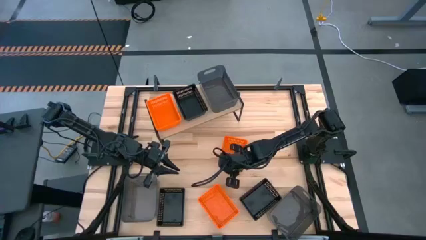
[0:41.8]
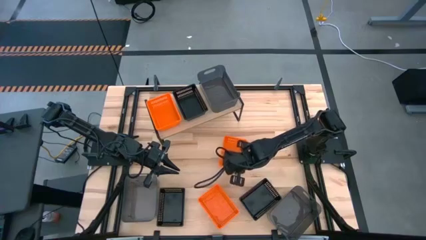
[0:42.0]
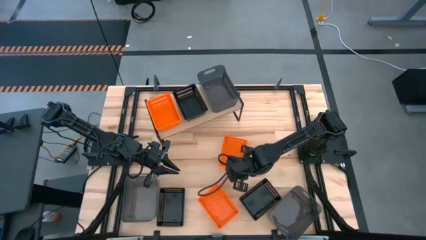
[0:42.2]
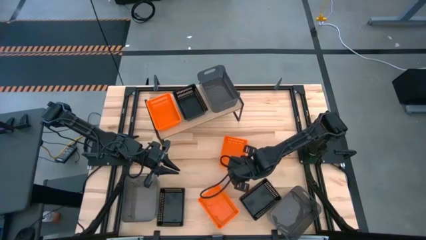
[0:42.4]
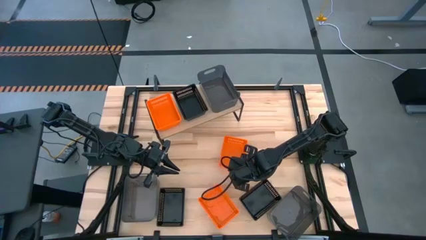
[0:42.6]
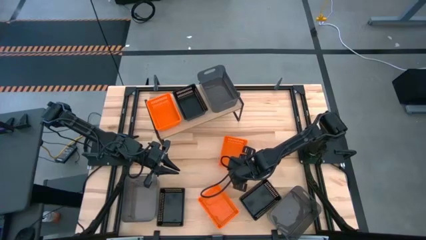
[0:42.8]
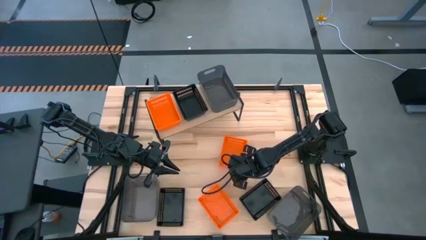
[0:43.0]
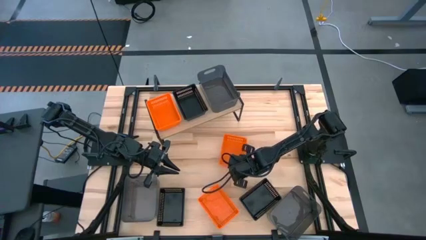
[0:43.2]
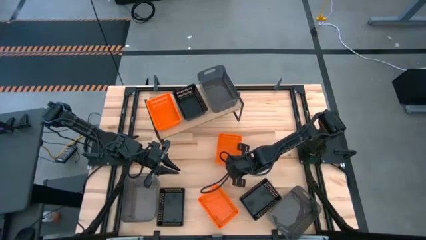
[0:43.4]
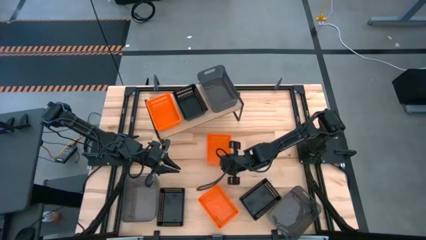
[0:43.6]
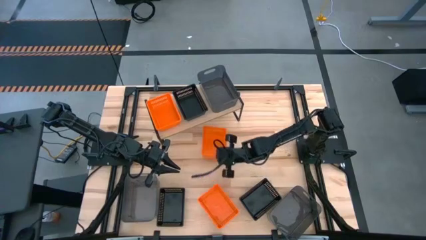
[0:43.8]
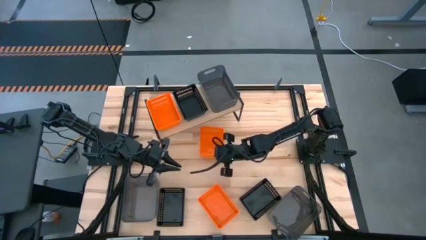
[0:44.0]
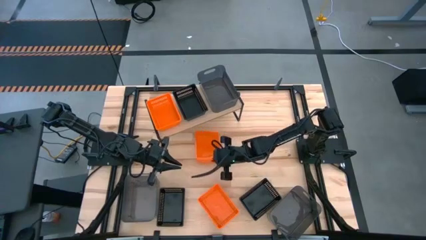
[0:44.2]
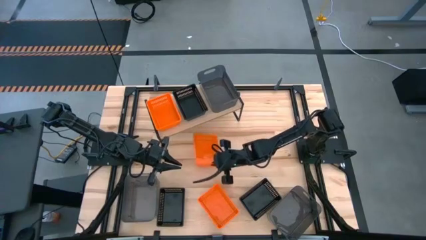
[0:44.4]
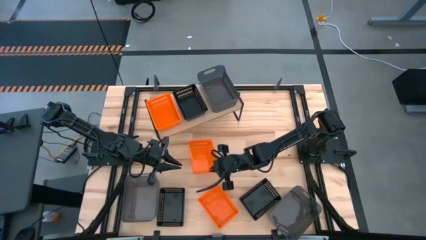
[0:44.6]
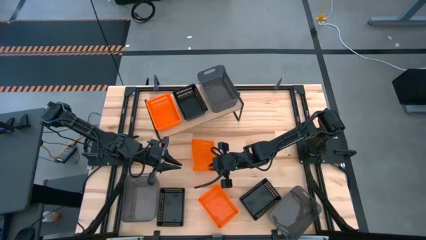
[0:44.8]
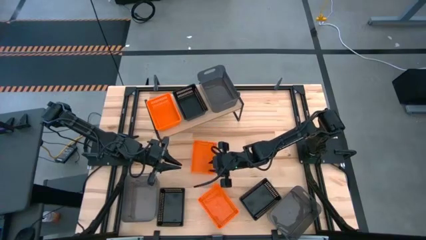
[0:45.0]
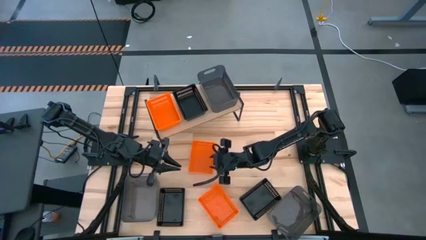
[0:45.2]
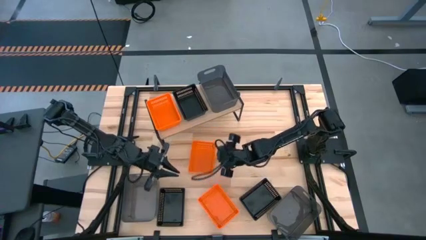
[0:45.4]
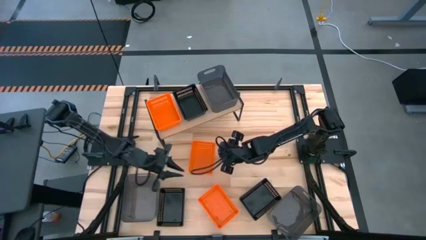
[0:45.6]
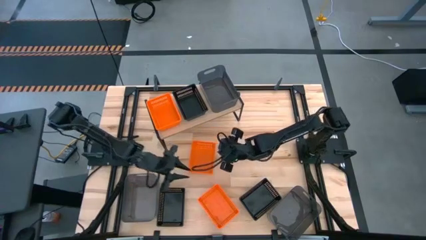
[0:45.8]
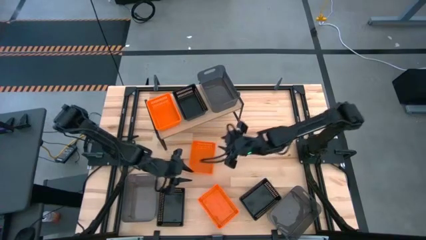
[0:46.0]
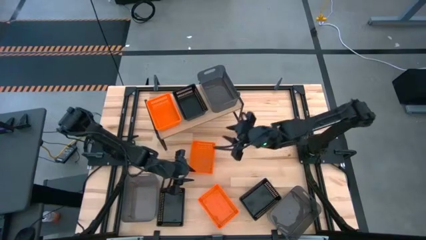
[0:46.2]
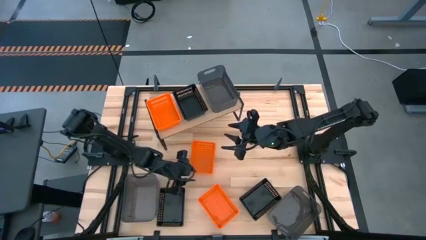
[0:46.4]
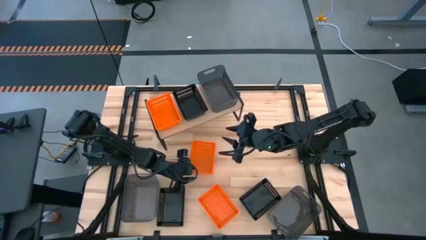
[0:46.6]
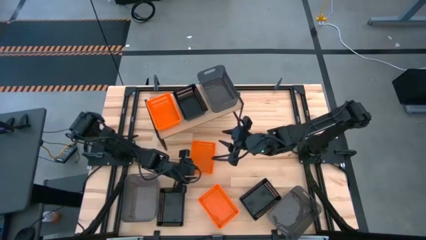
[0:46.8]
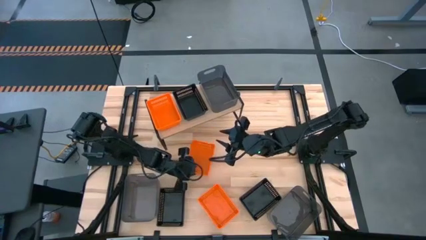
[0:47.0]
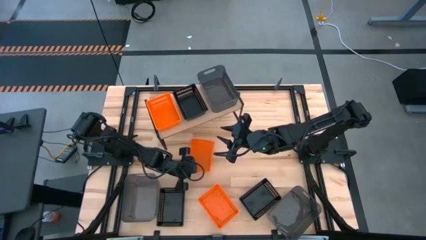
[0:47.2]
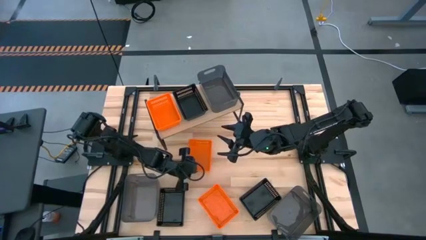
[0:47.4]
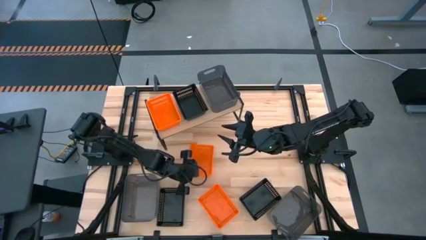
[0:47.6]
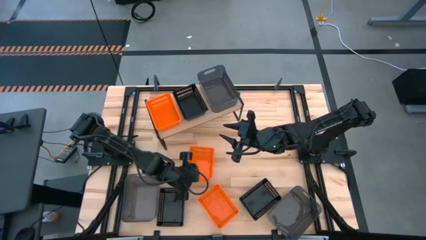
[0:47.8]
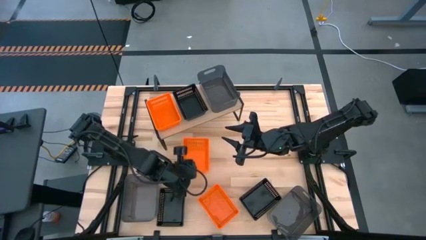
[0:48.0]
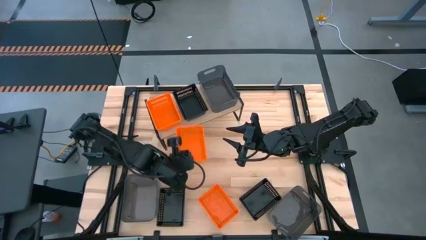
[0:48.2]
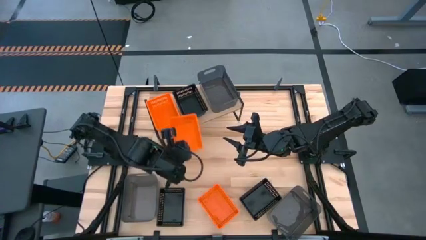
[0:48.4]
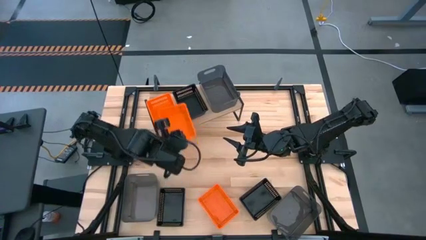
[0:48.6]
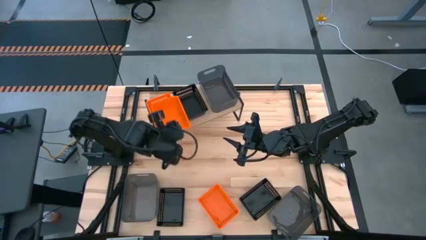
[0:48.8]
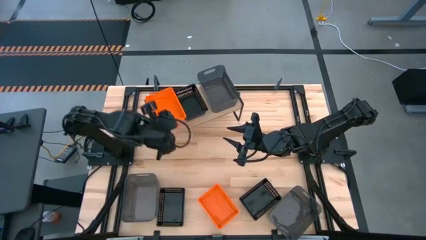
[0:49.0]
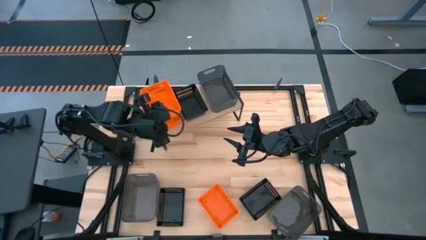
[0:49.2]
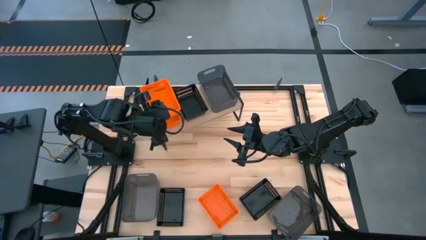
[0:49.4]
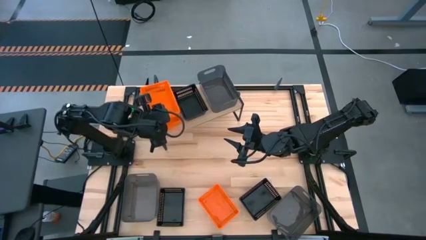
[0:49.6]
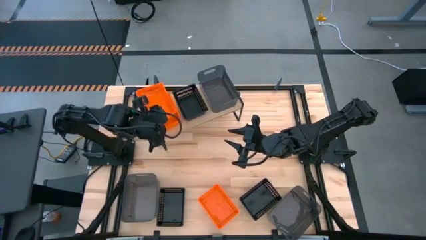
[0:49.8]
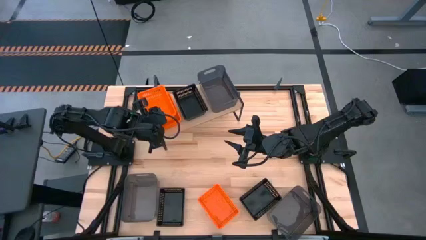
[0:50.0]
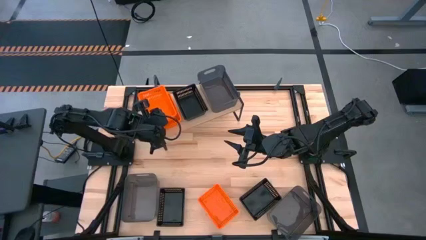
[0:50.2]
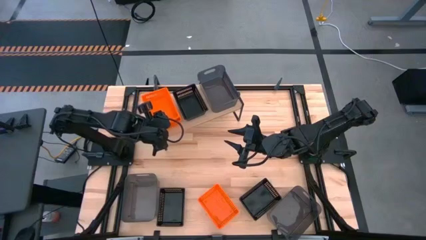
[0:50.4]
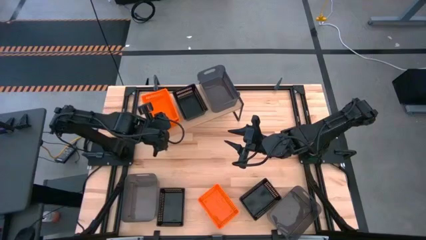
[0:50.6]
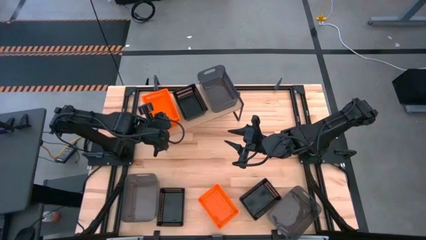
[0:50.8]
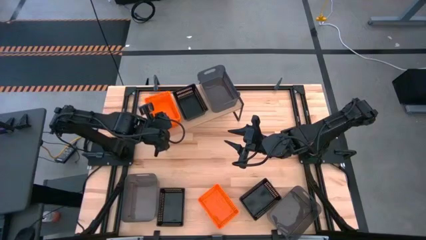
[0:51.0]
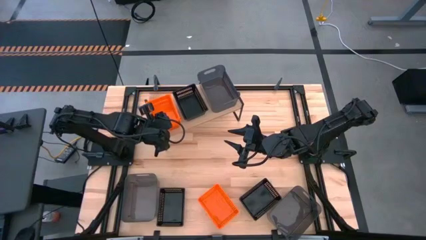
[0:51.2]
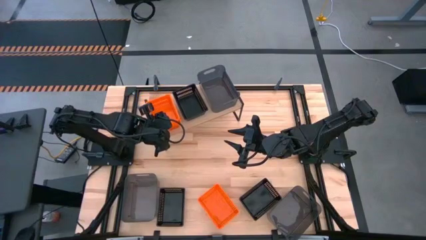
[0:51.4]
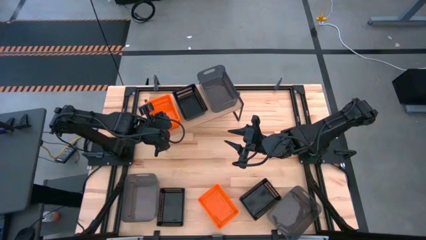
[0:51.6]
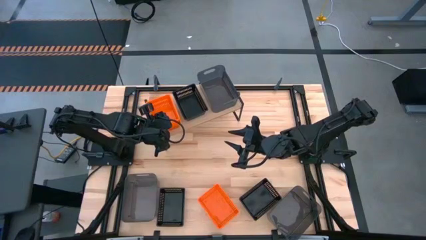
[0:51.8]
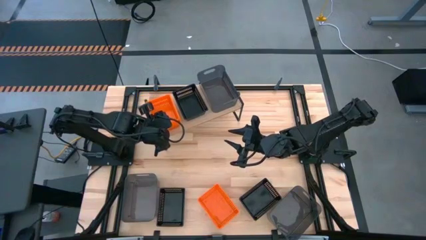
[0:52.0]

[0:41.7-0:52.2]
Task: Stack baskets on shelf by color
Stack the top orange bin on top of the orange bin on the shelf

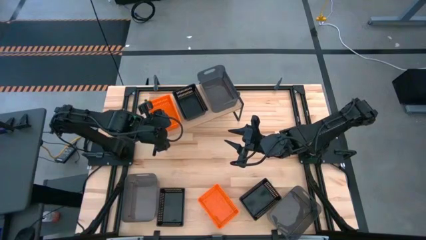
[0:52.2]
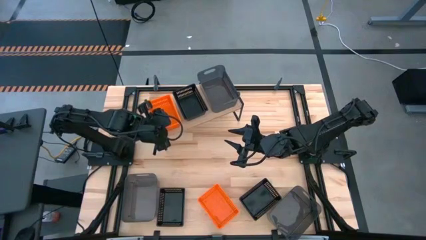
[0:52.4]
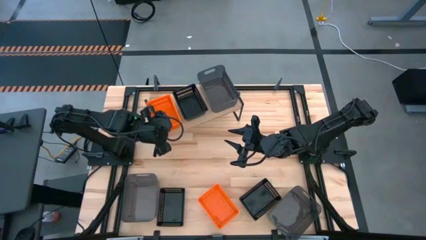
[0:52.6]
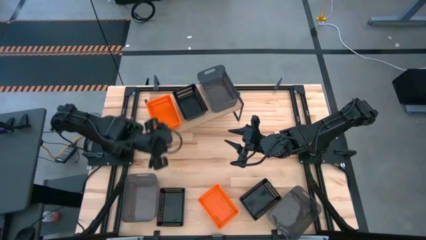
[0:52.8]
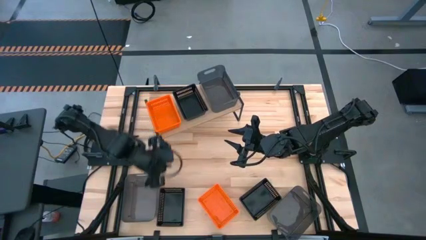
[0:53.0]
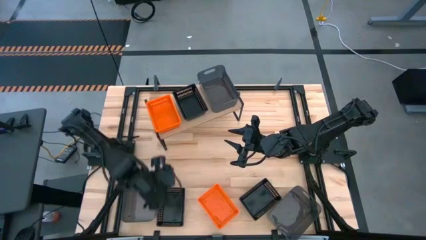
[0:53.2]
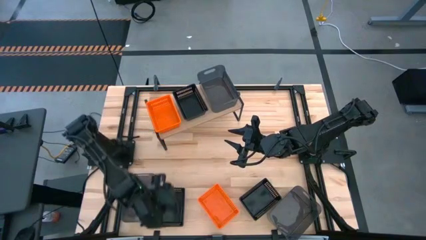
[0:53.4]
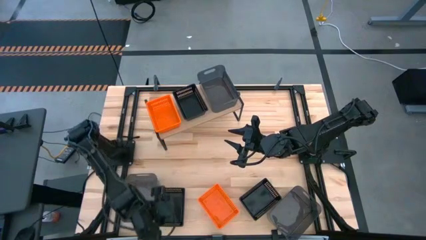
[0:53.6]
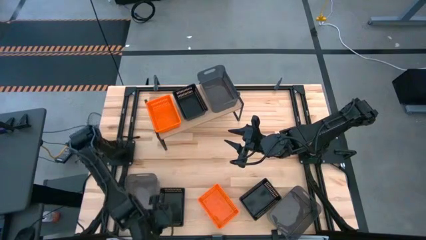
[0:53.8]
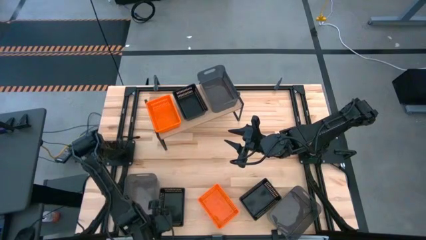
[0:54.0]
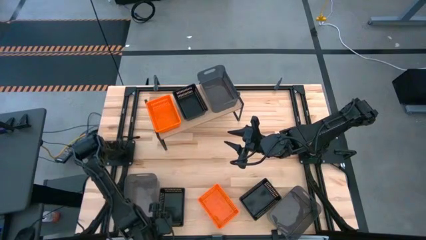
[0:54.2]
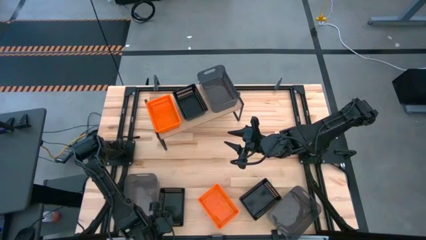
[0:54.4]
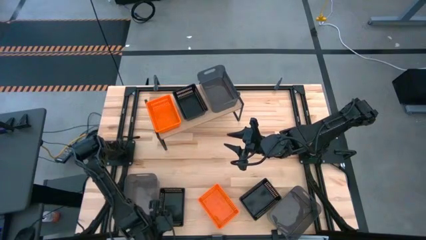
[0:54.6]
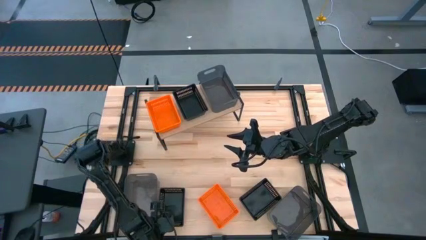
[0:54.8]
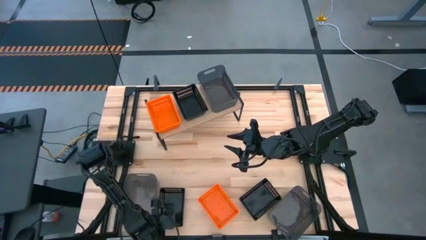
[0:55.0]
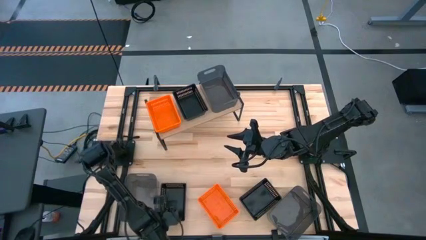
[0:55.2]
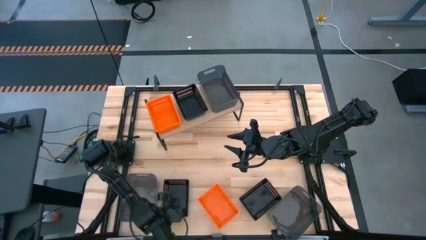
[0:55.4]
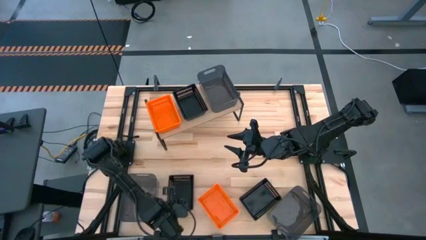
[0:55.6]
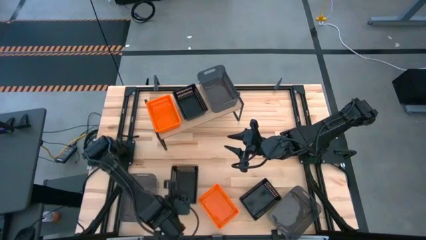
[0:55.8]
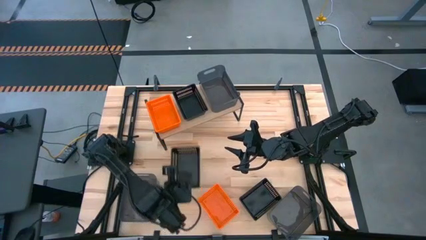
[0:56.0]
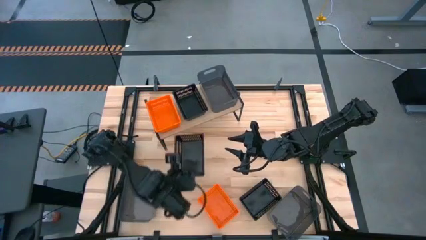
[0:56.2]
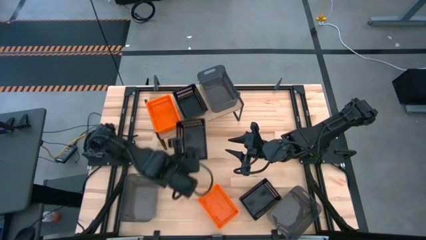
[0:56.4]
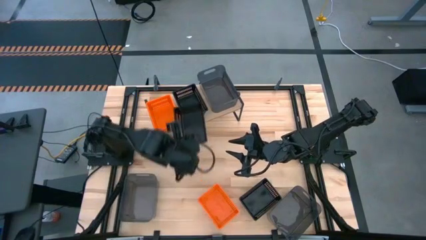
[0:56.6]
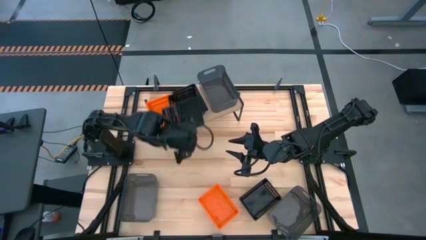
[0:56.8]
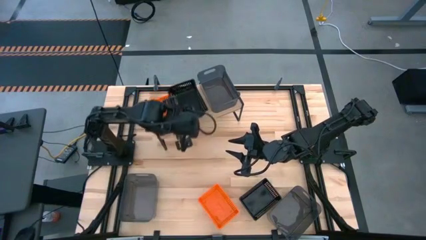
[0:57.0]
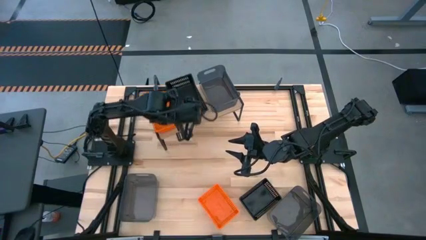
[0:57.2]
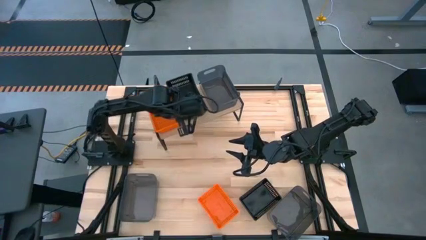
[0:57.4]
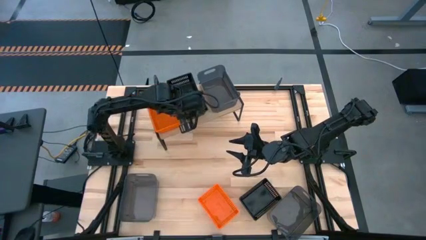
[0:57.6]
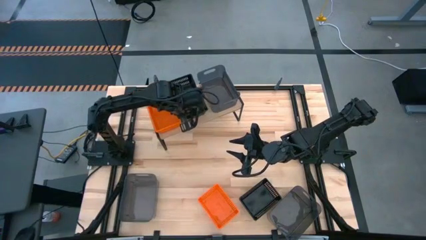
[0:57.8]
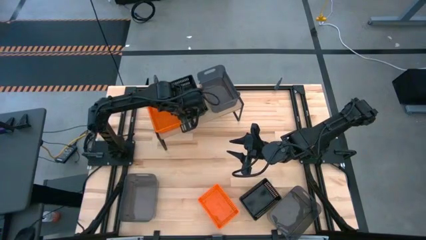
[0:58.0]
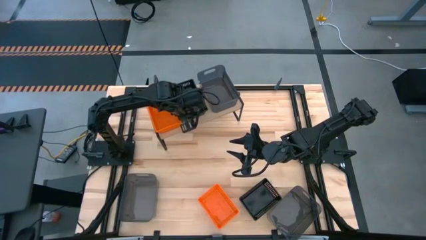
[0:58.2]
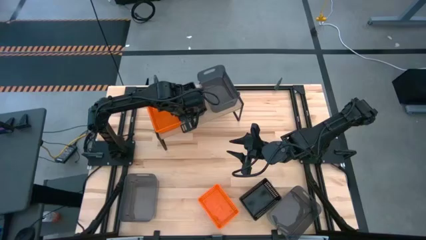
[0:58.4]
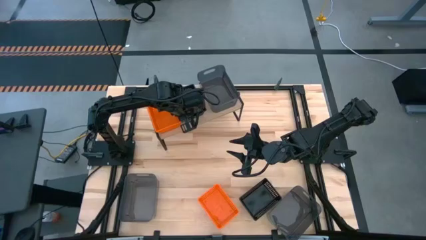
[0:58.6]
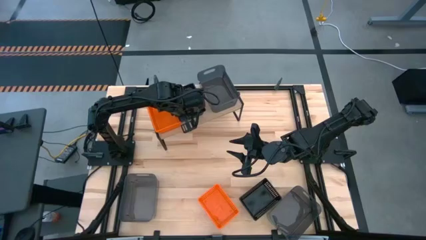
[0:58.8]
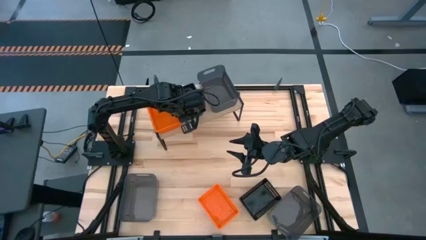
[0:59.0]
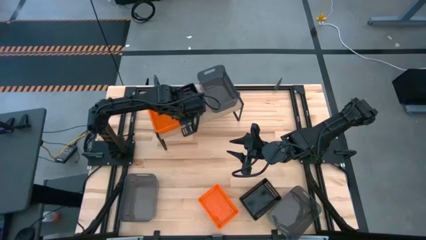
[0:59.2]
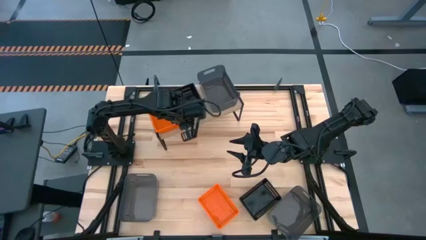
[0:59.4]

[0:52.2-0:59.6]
Stack the left black bin on top of the black bin on the shelf
